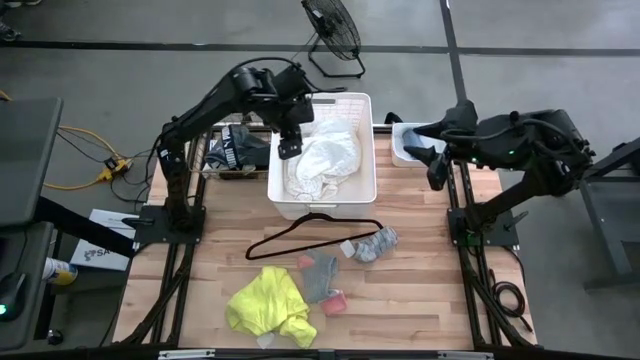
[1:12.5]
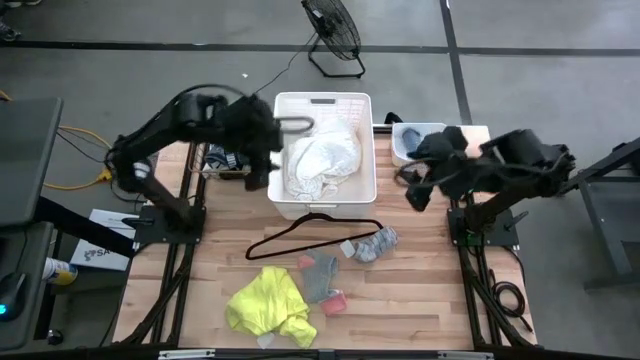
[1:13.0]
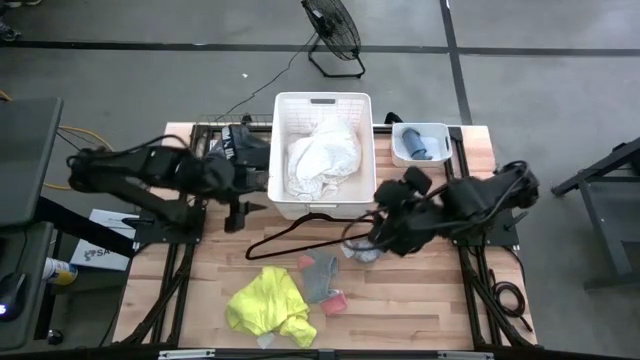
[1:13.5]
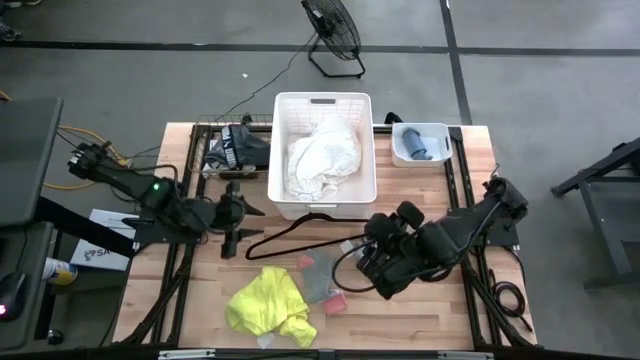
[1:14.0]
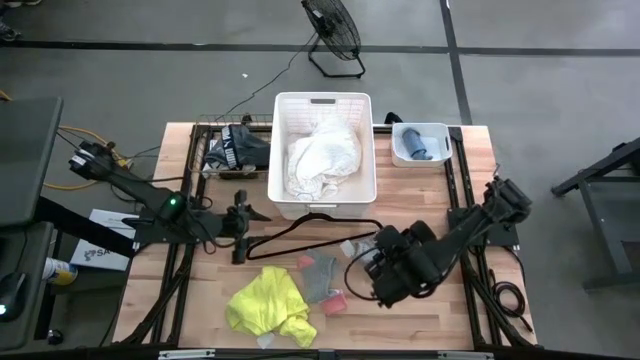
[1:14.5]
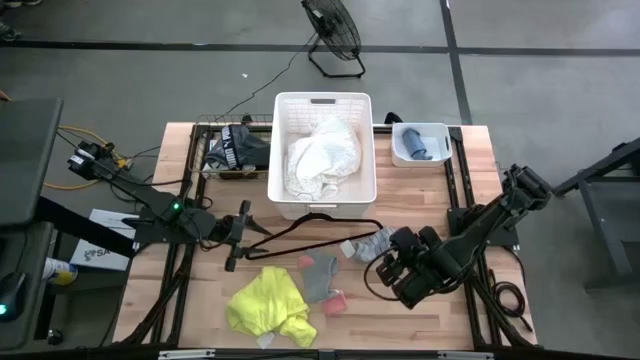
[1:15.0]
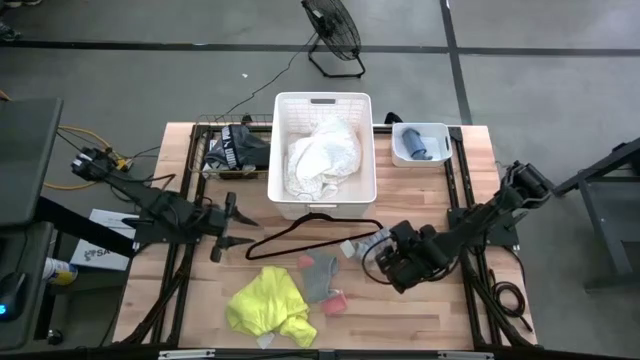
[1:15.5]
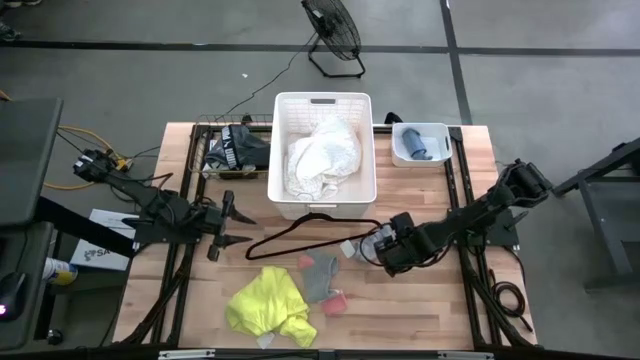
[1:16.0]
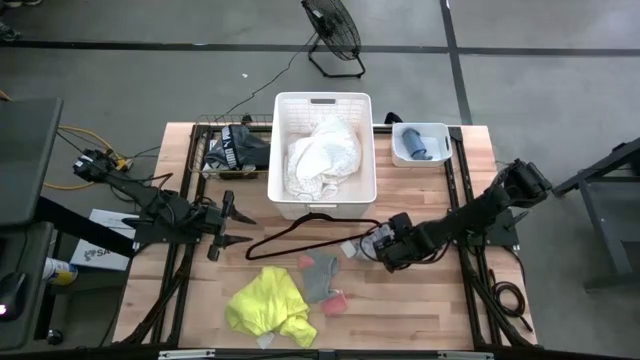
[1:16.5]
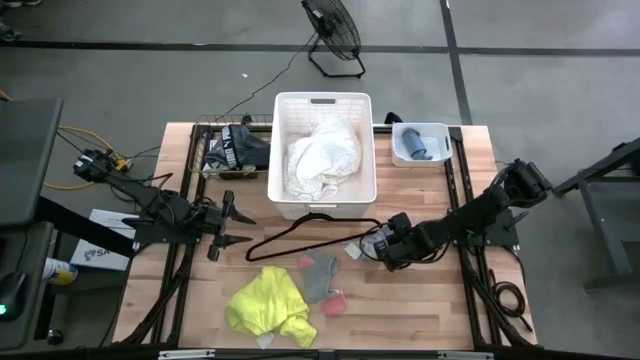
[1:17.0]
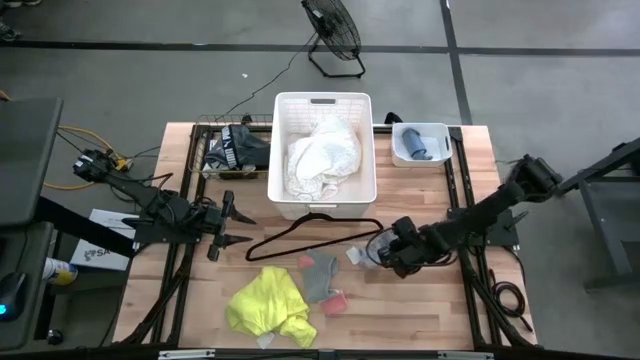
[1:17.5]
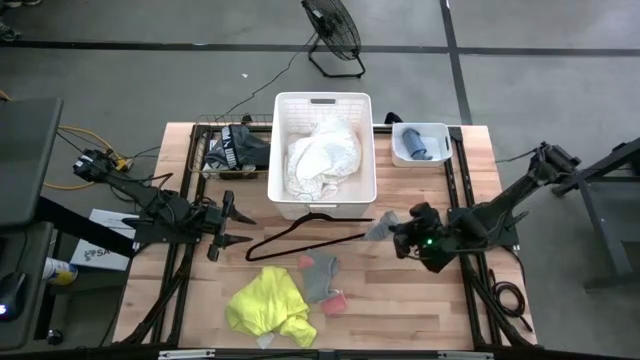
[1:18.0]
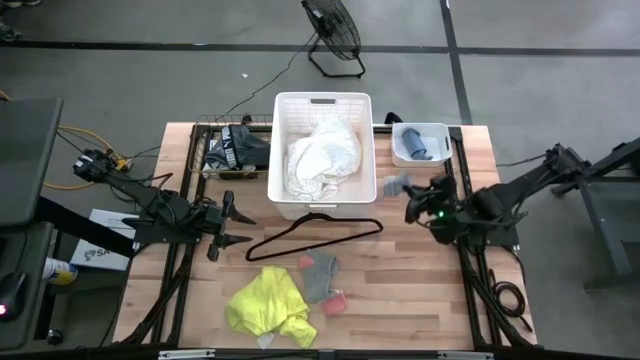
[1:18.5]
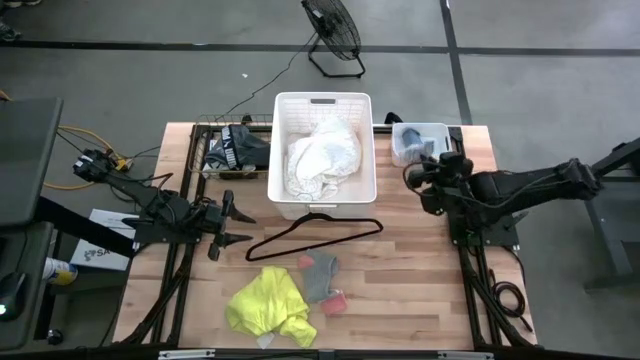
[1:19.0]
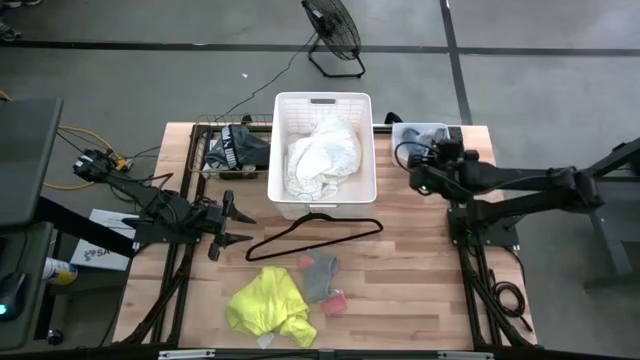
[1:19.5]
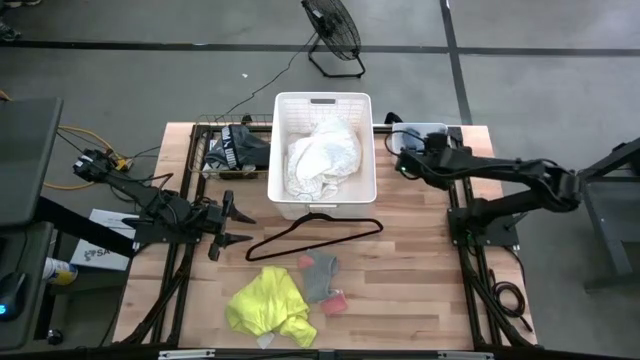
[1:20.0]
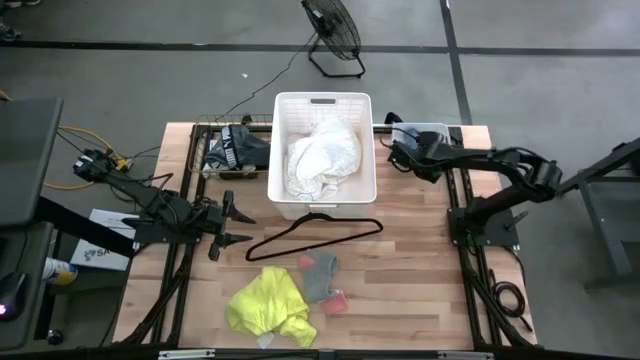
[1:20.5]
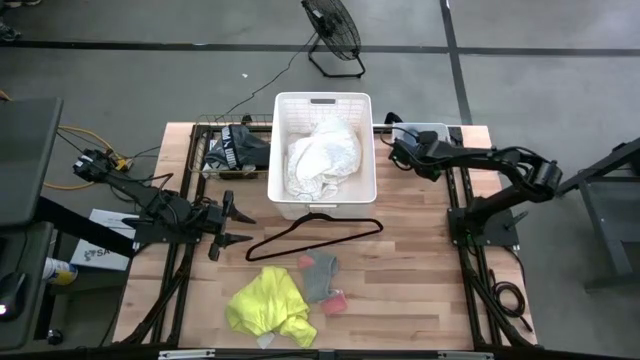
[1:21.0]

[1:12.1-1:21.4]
Task: Pick & Place Cloths
Put the striped gray sock into the small white bin

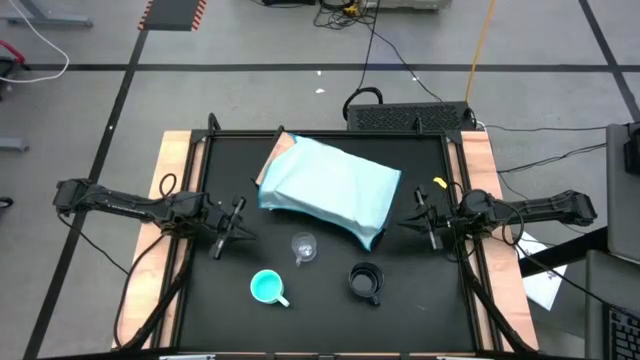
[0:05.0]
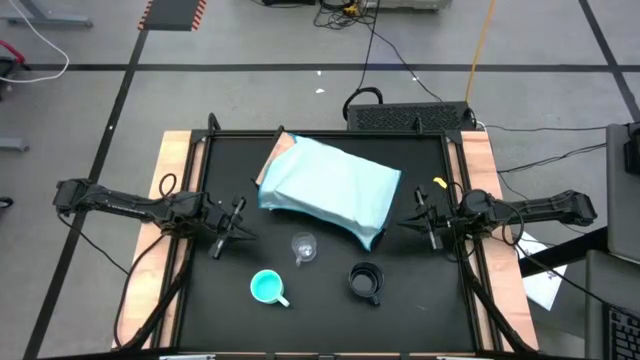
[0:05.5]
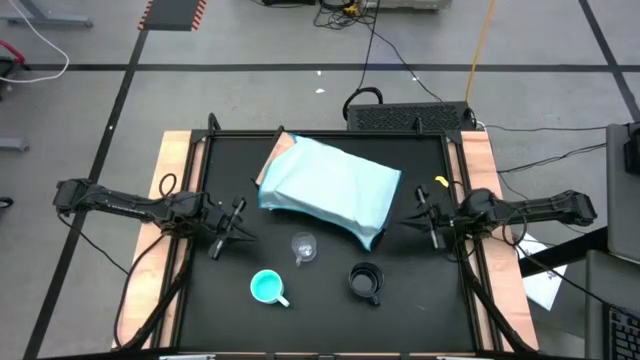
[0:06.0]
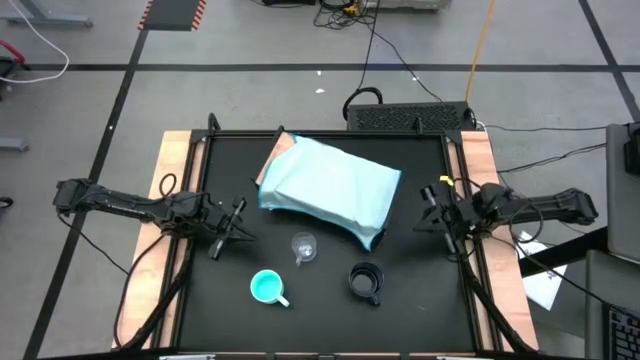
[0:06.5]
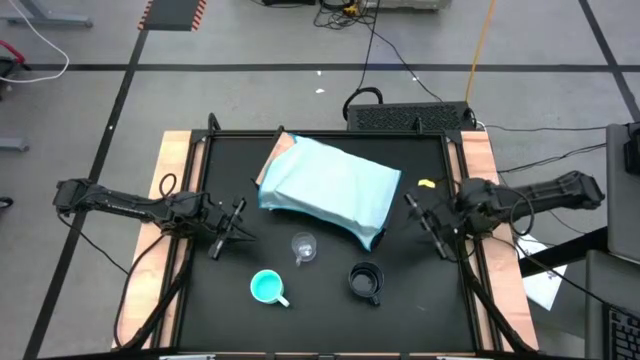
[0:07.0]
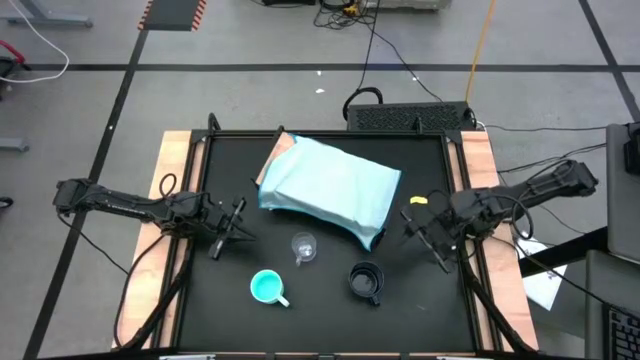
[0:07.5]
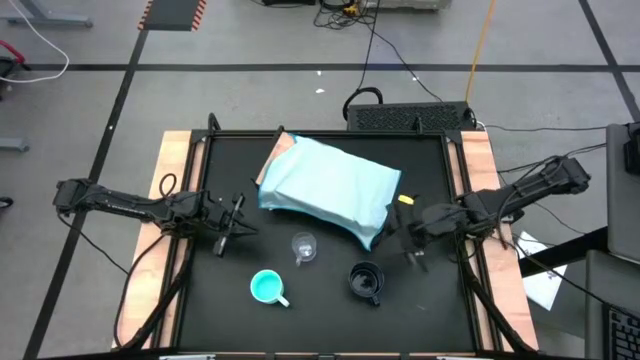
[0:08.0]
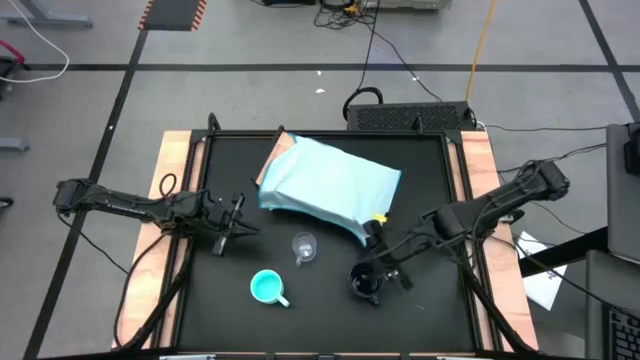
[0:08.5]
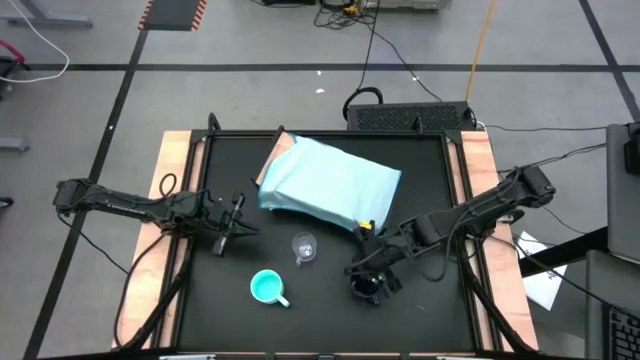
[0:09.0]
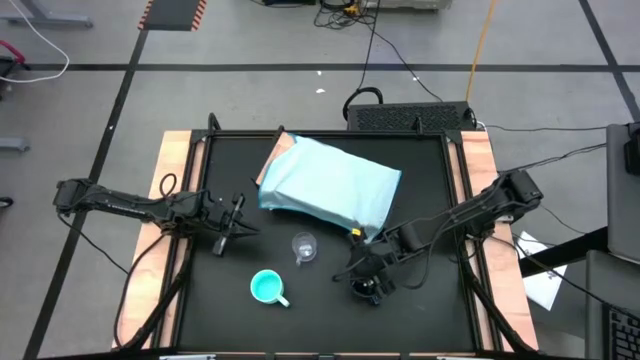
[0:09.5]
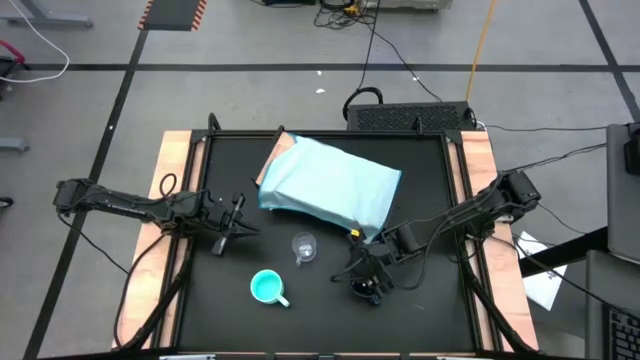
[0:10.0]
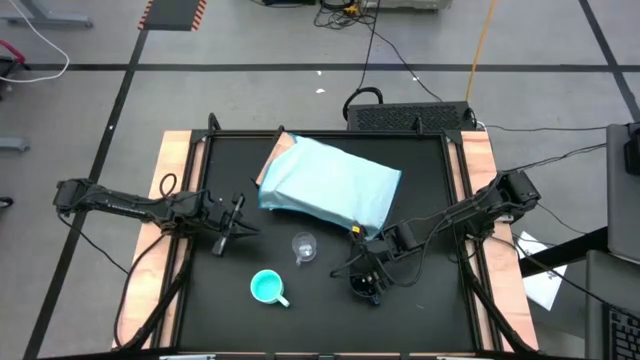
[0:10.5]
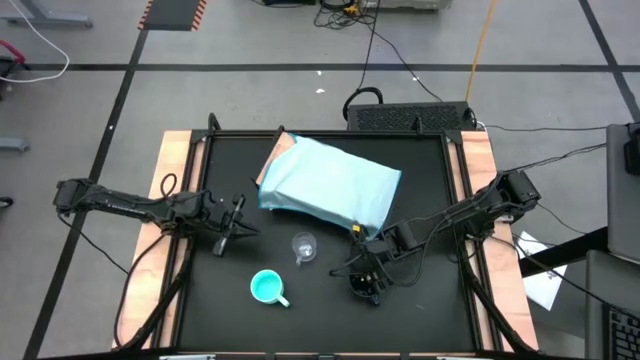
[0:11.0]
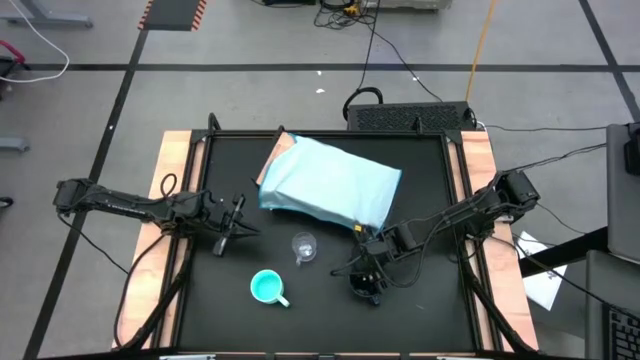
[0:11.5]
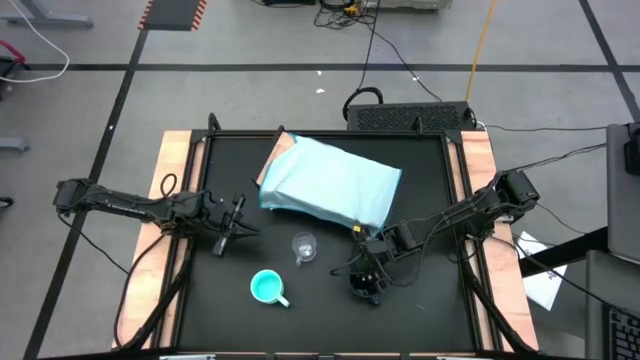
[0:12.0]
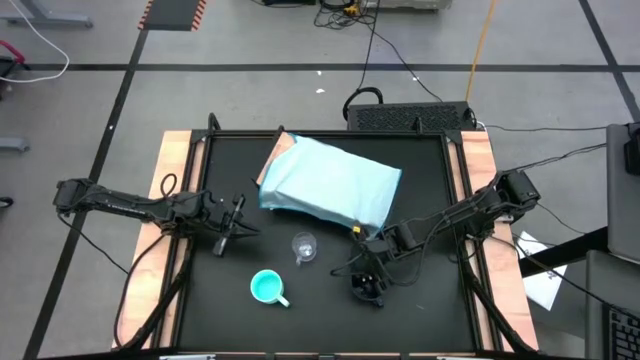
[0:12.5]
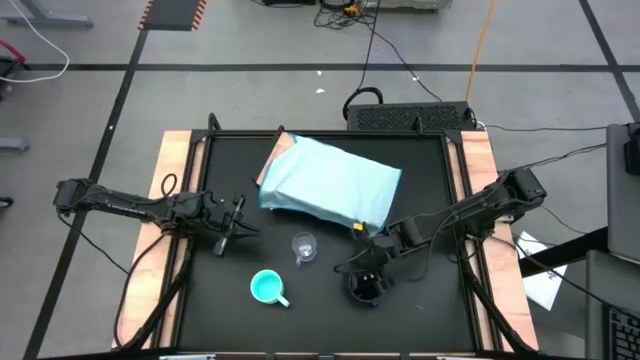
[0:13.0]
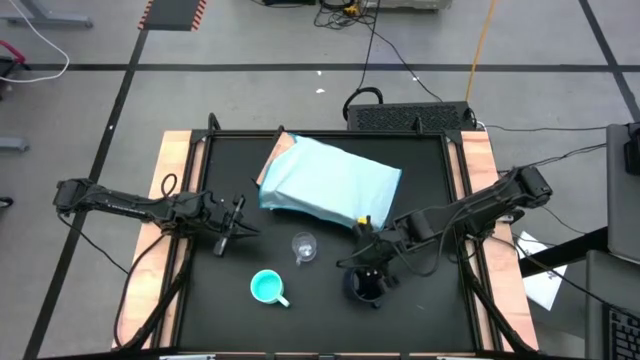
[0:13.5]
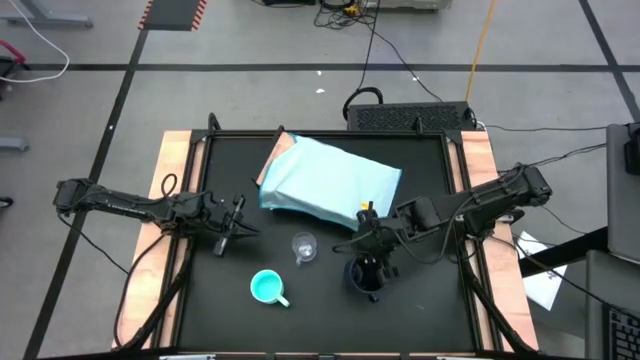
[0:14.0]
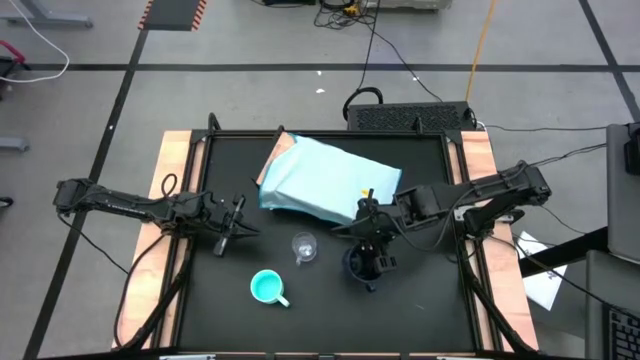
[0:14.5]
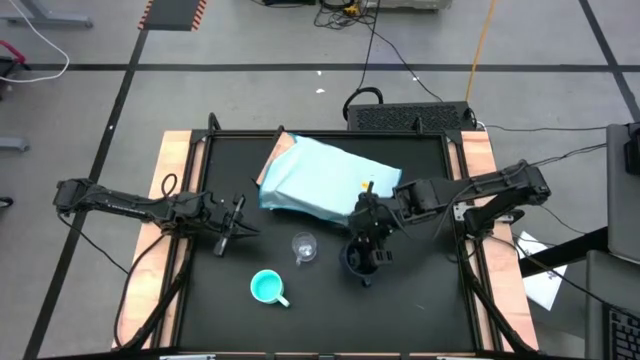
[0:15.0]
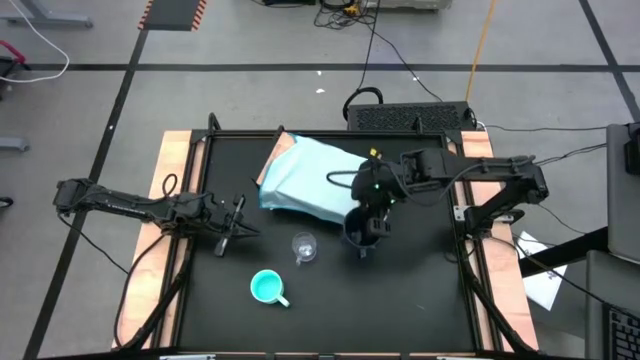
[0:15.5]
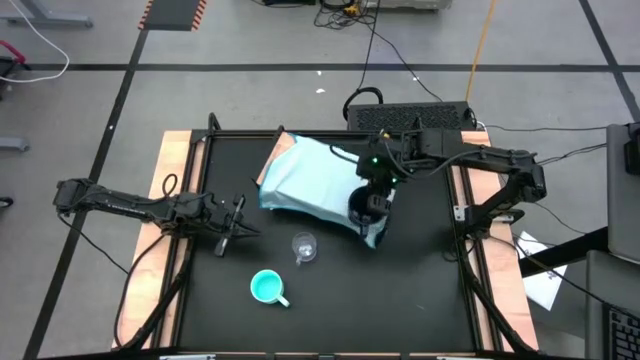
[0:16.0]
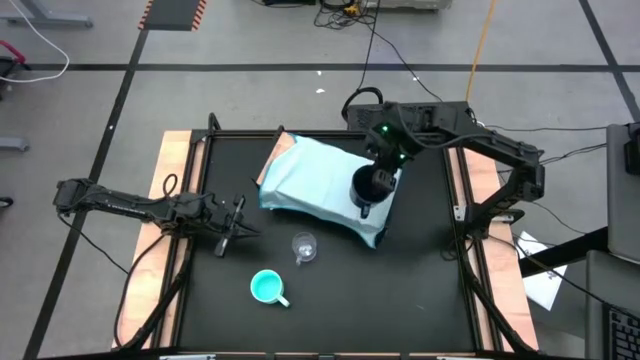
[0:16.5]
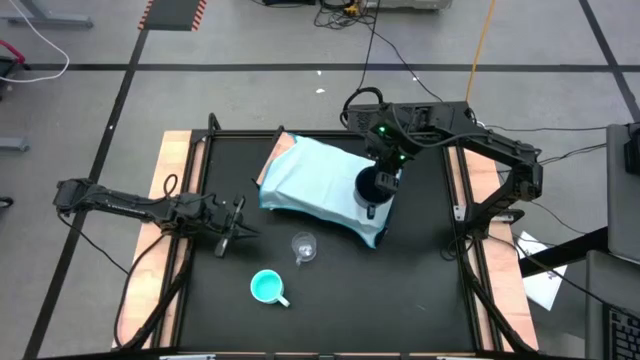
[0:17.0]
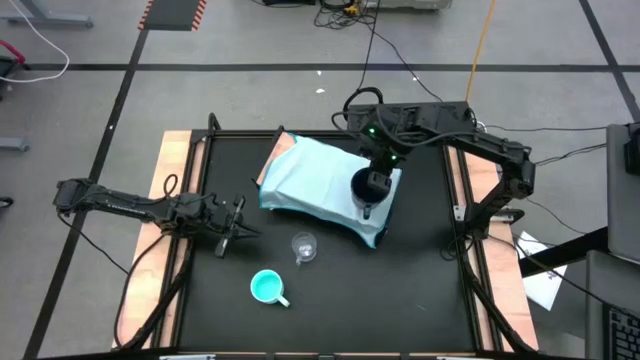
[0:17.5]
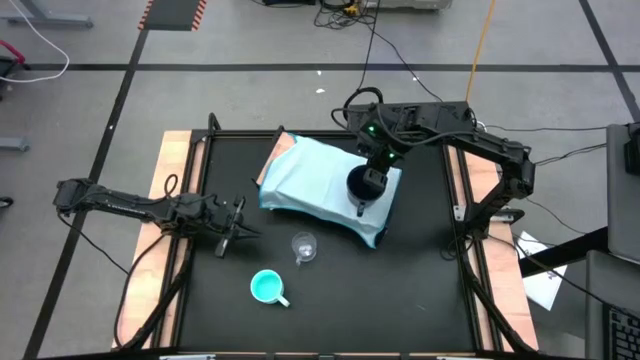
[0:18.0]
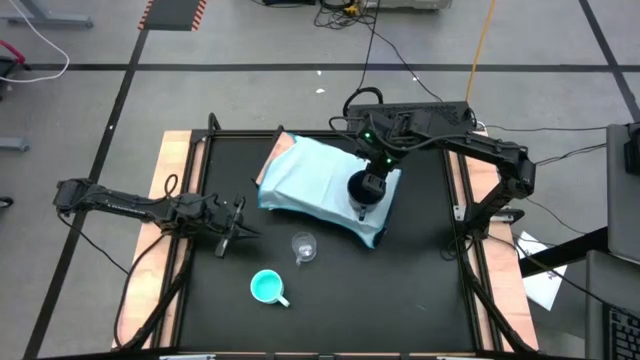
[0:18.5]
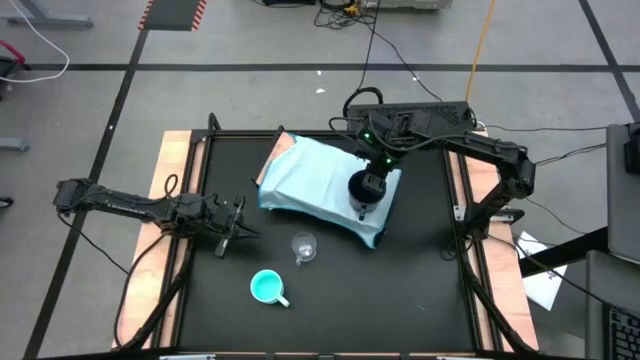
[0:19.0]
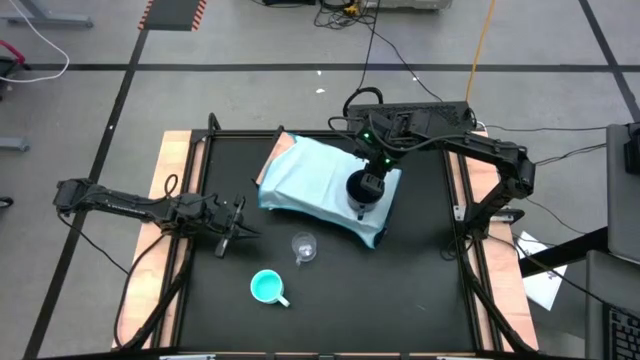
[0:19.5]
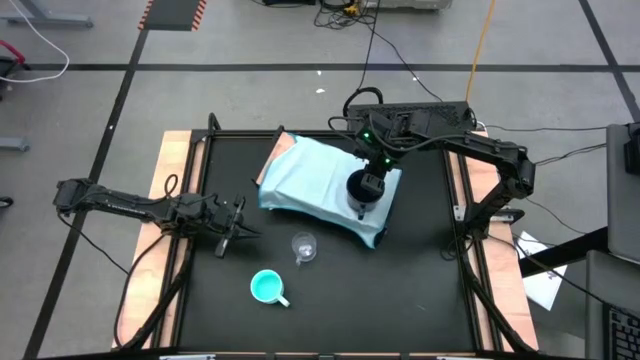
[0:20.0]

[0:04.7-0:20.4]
Task: Stack small to large cups/mugs on shelf
Put the dark blue mug on the shelf
